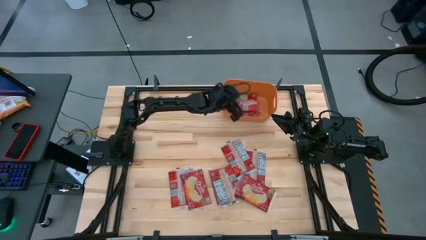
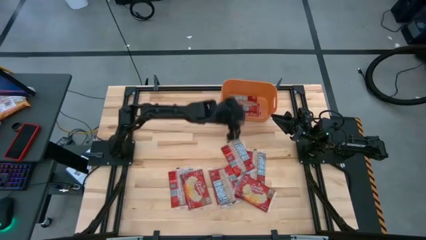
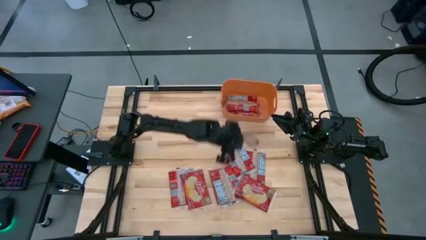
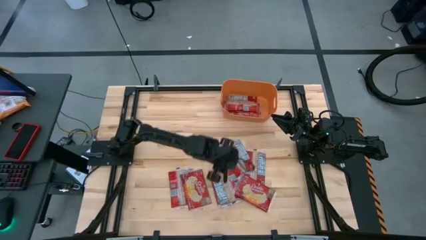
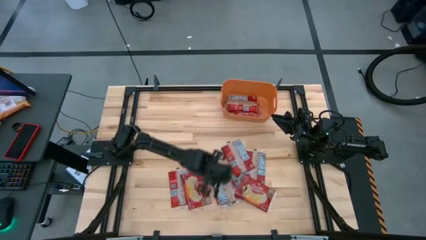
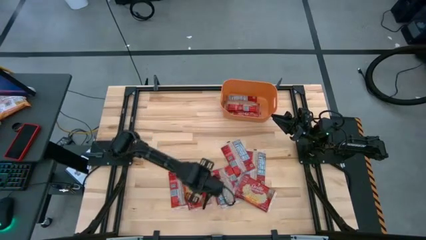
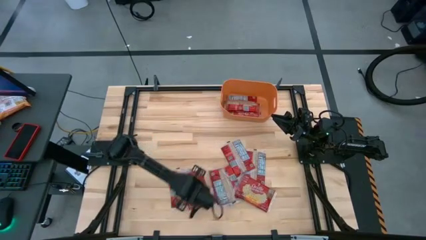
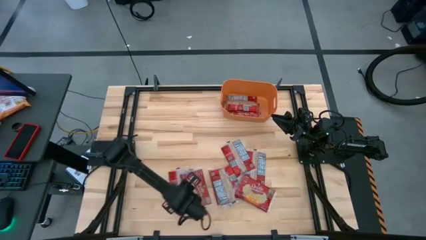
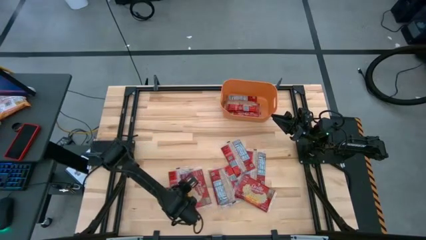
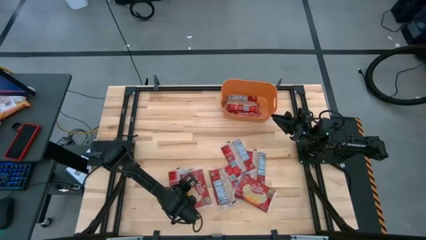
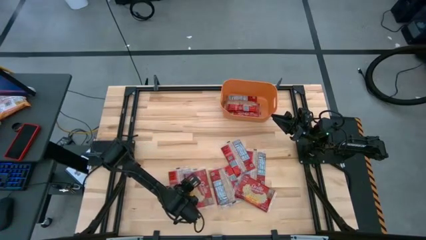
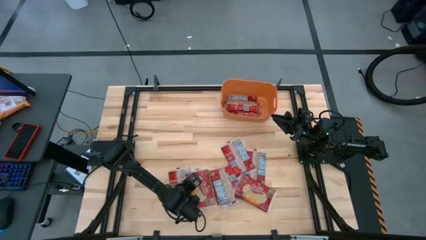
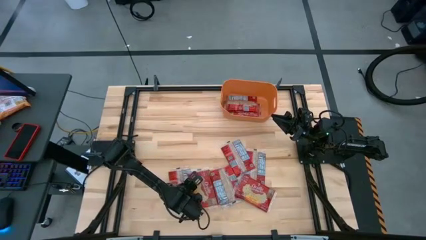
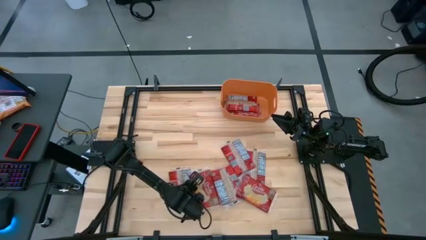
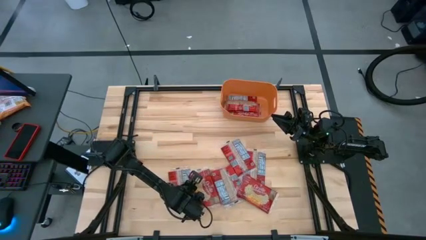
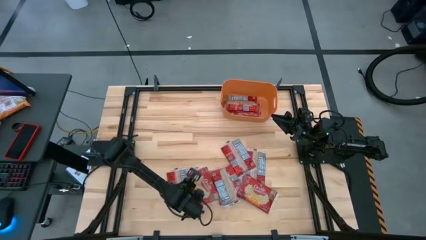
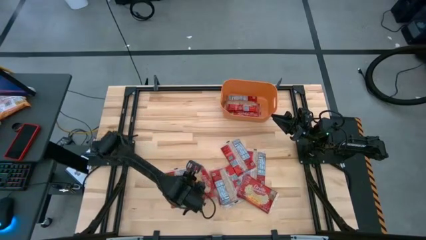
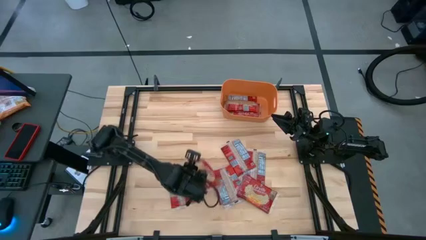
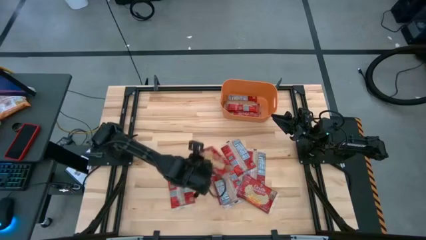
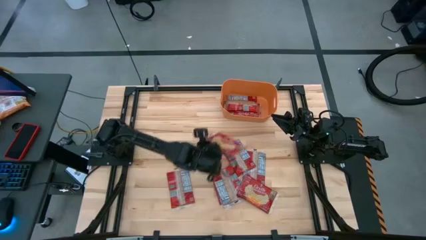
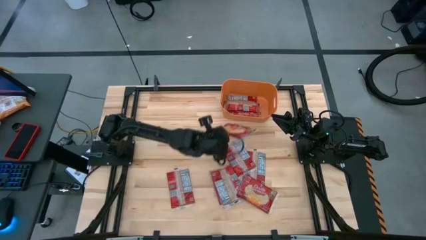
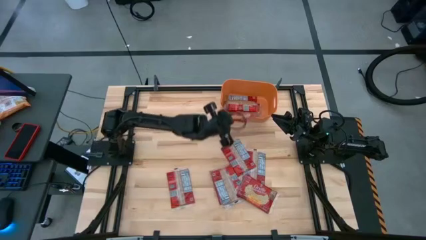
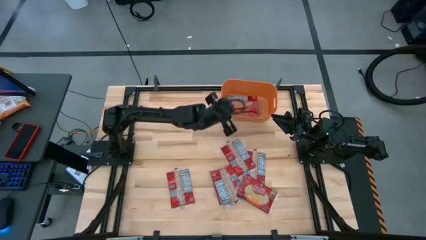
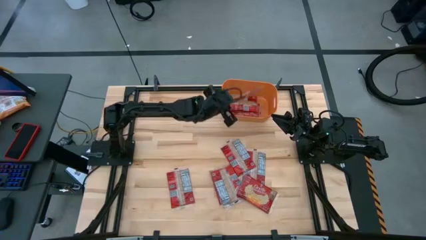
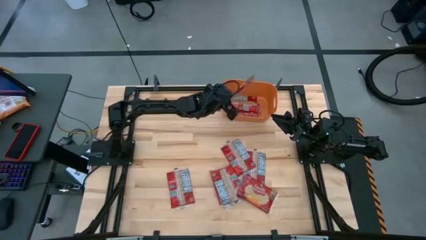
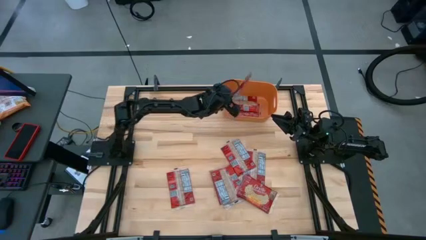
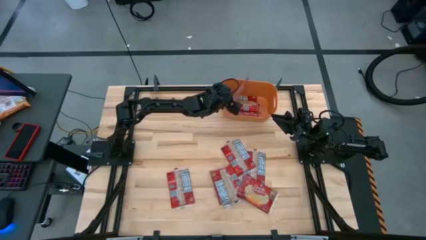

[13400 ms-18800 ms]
Task: Sort popcorn bags into baskets
Put the red popcorn bag into the orange bin

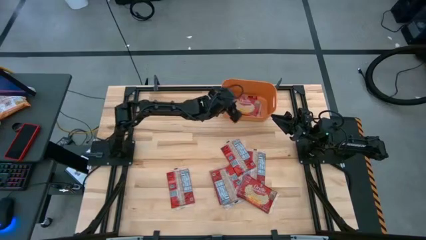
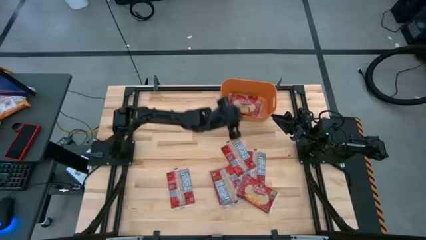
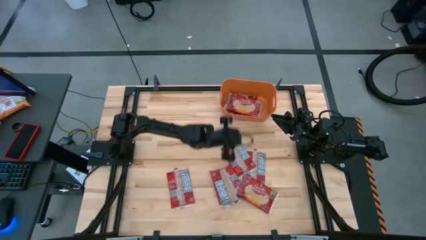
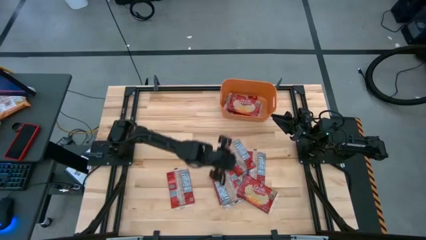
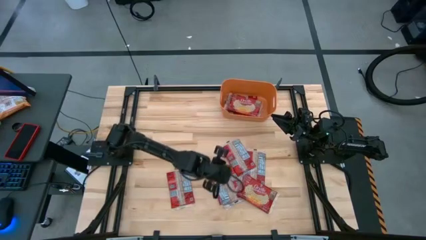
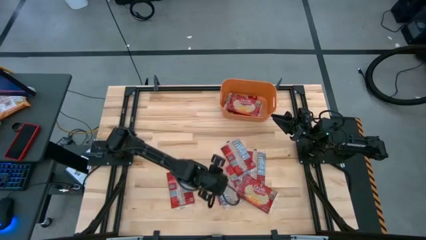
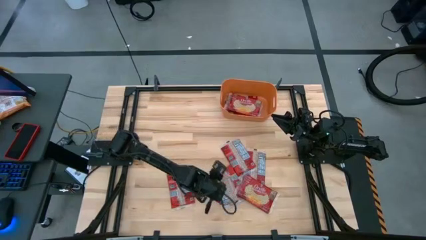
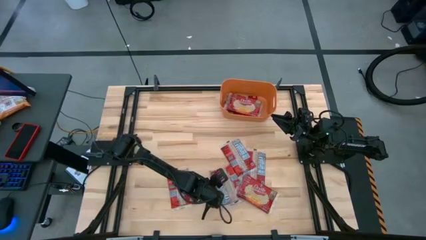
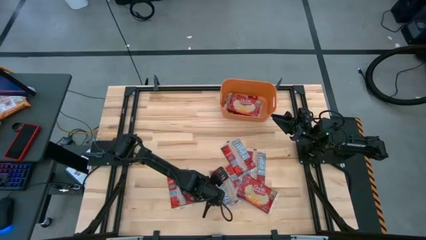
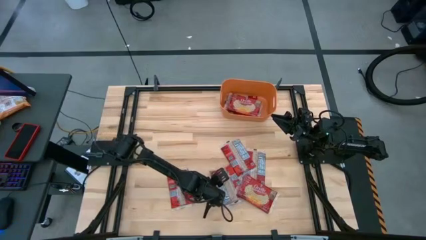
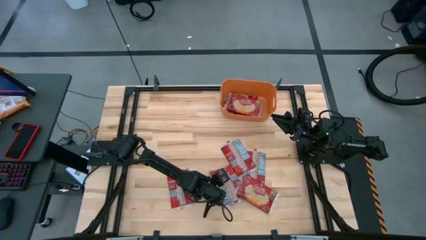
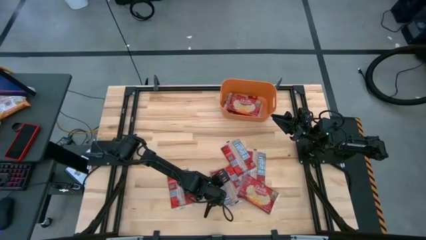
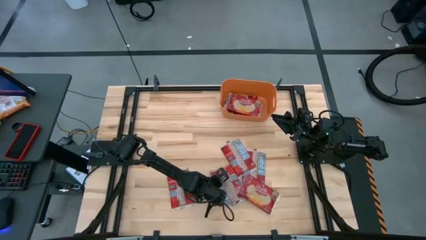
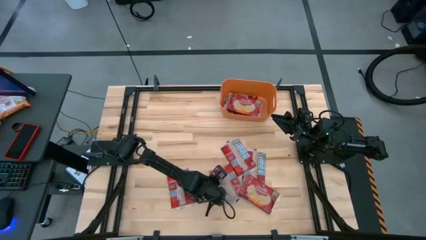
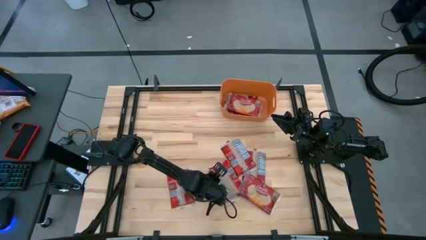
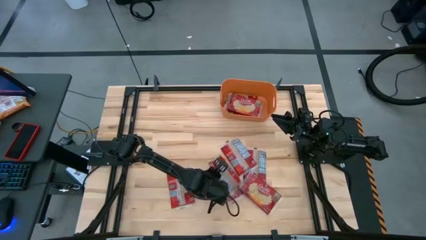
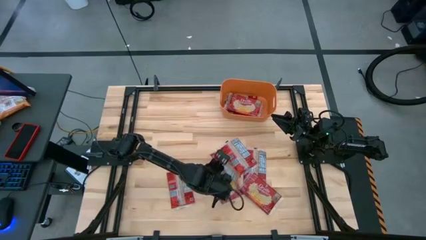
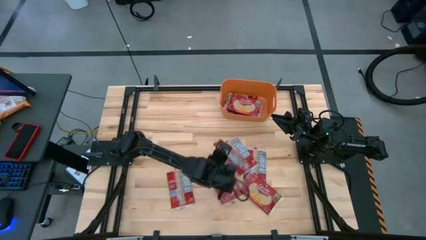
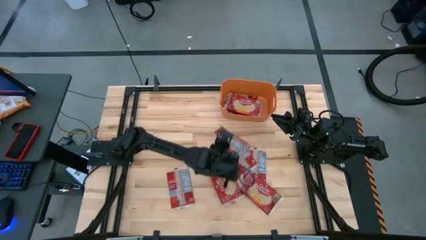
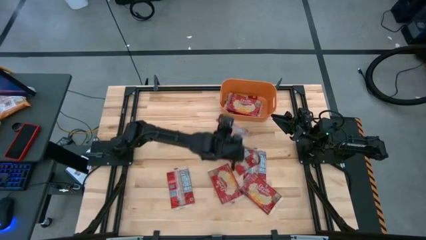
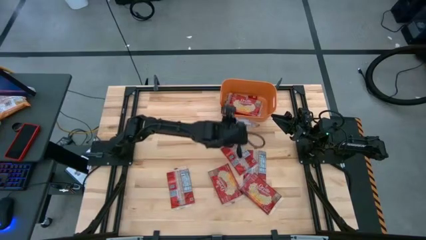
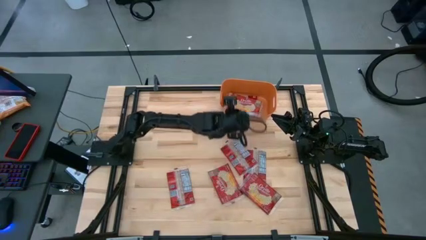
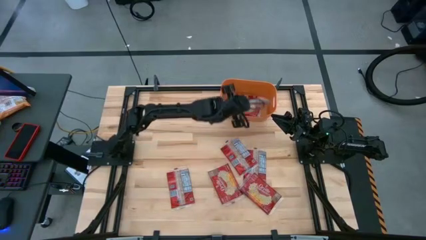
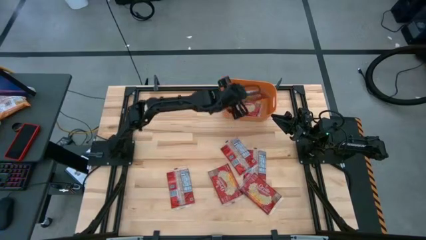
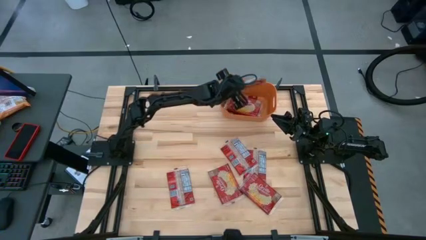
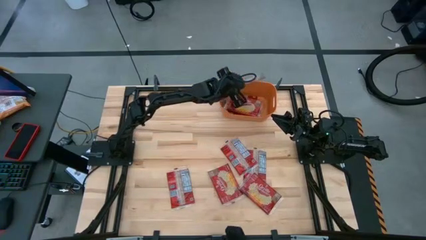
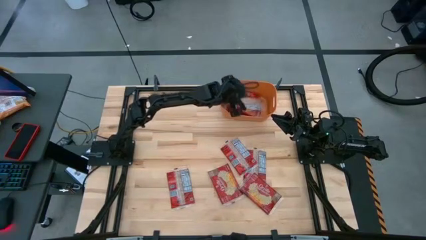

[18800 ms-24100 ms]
Put the red popcorn bag into the orange bin

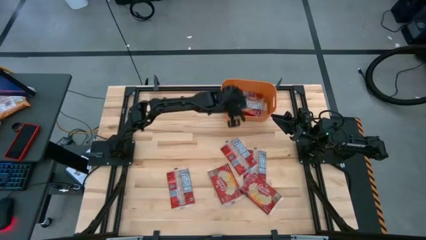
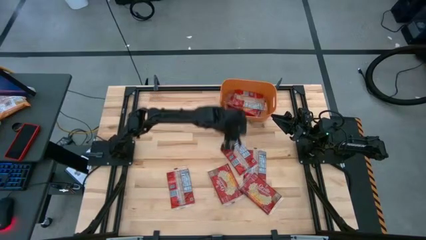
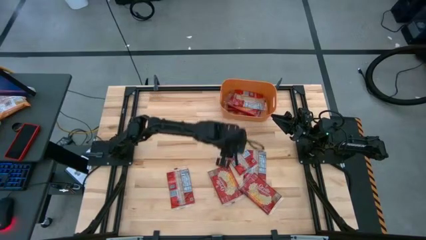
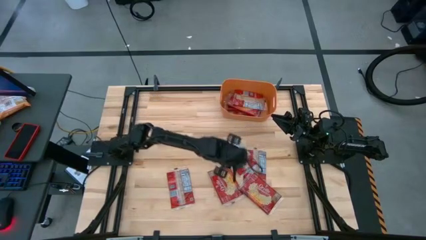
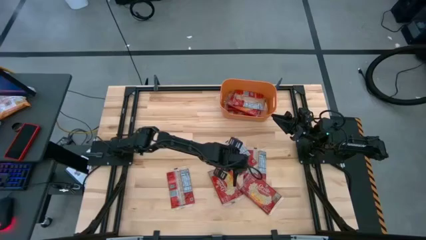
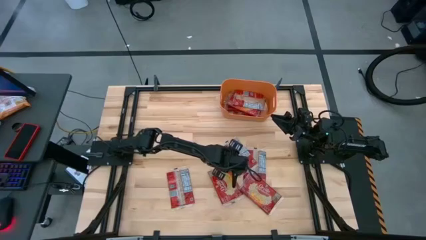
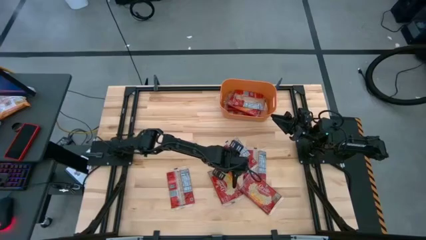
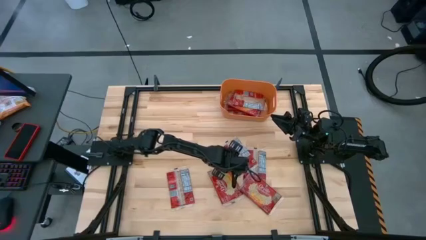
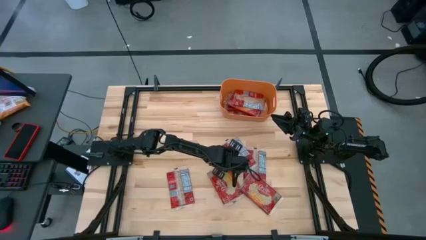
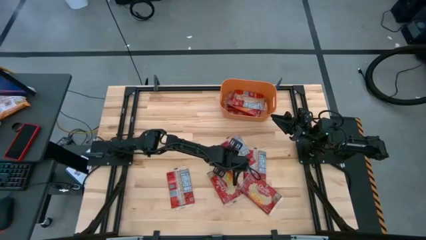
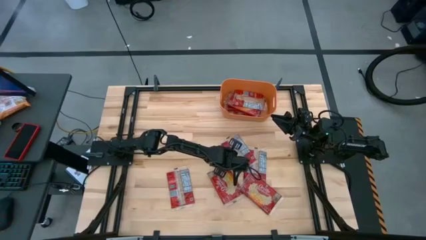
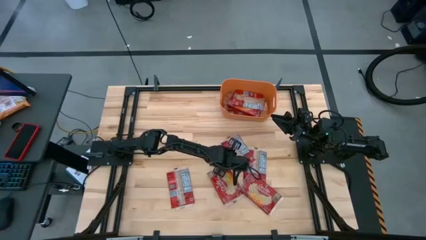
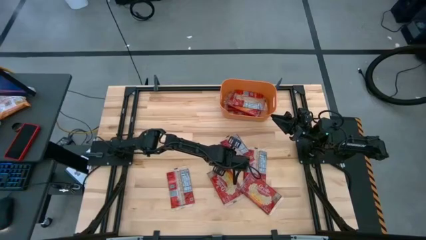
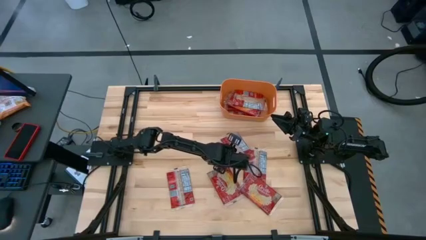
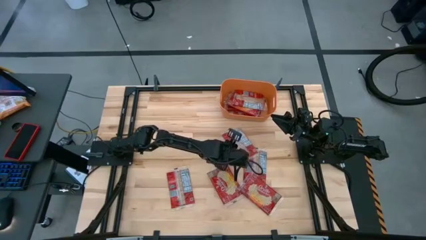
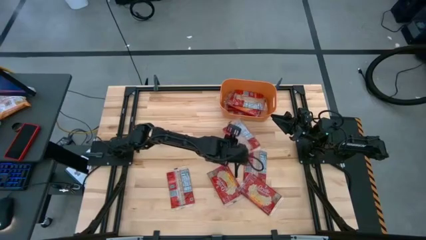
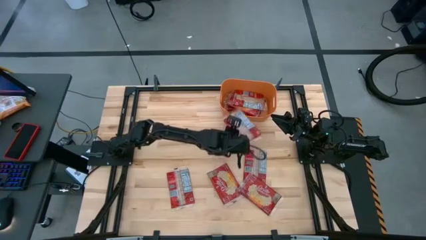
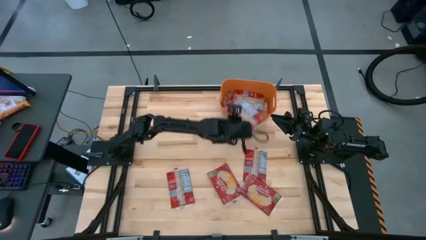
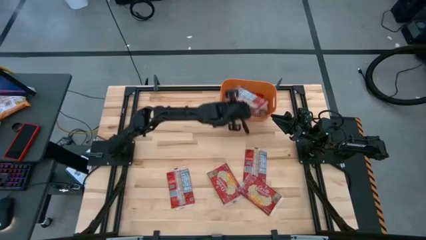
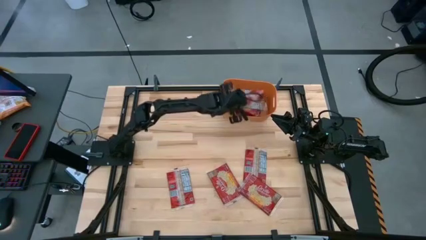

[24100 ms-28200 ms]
Put the red popcorn bag into the orange bin

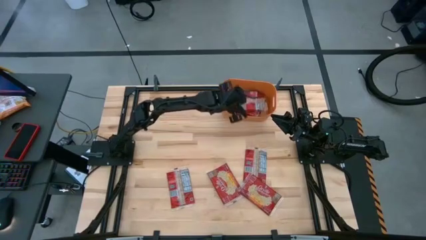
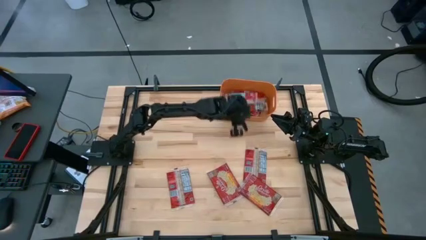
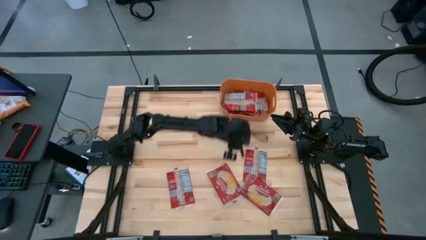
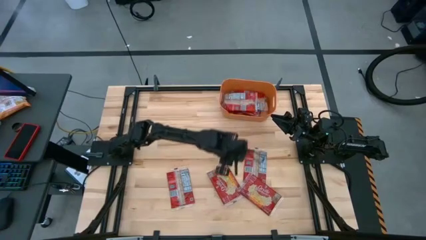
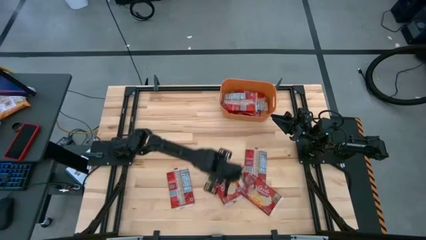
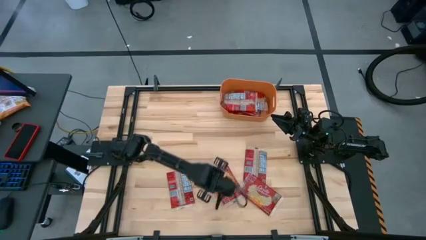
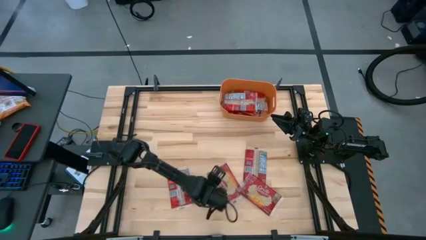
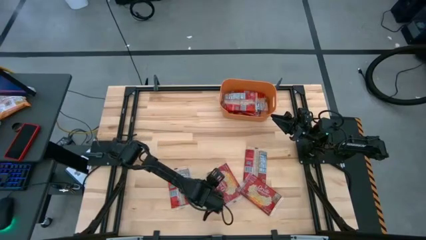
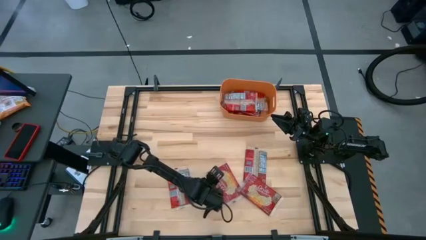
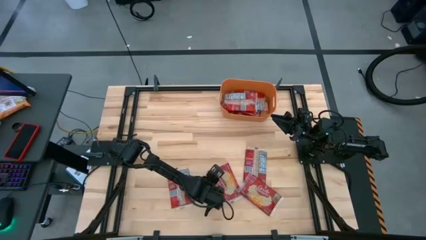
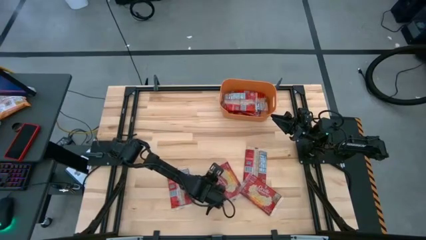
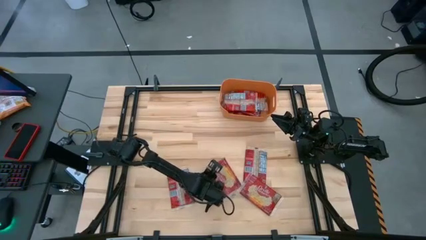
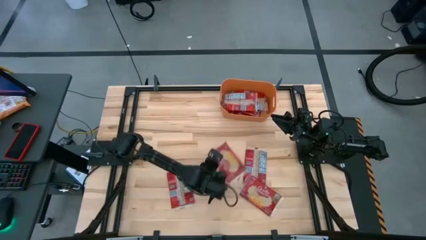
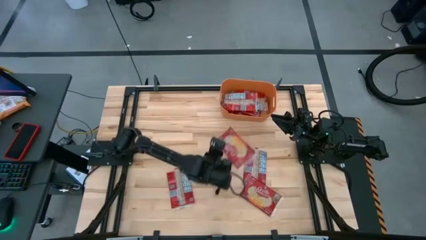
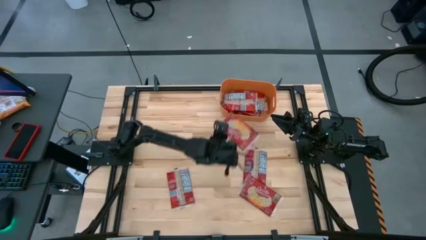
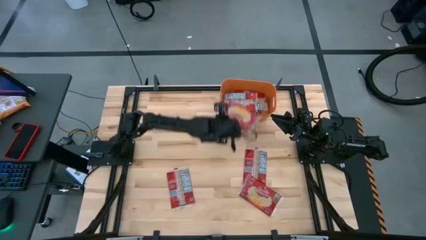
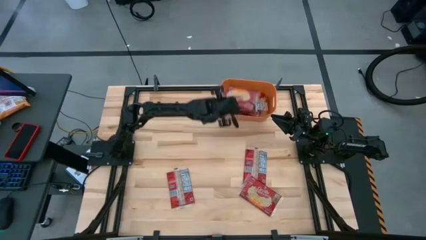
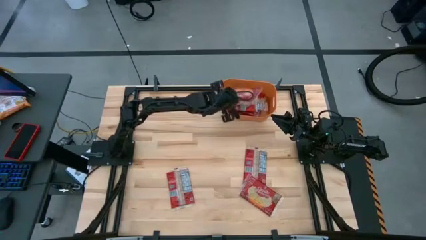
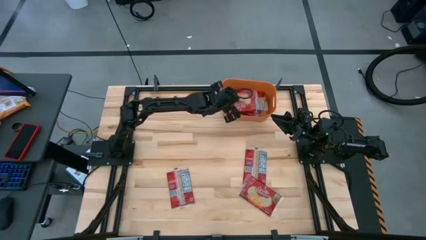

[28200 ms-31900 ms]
Put the red popcorn bag into the orange bin
